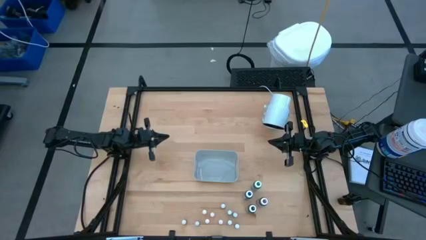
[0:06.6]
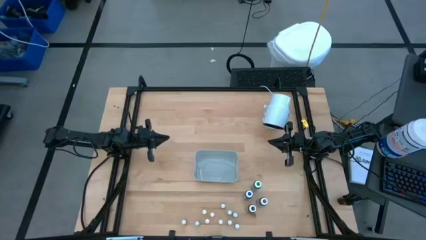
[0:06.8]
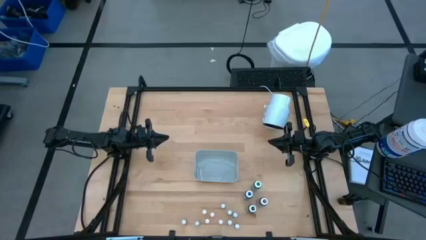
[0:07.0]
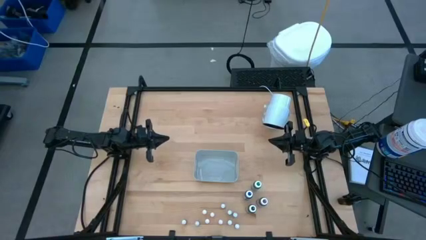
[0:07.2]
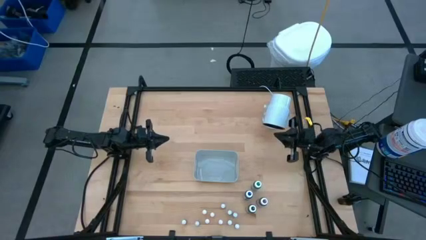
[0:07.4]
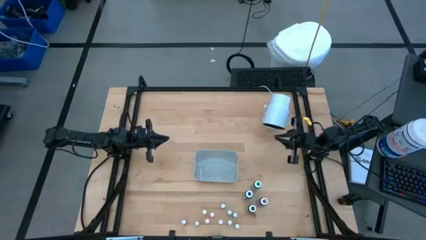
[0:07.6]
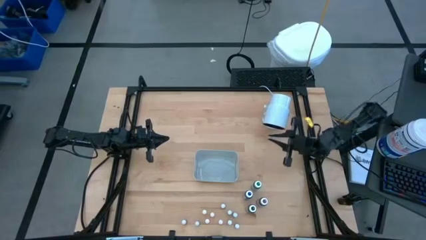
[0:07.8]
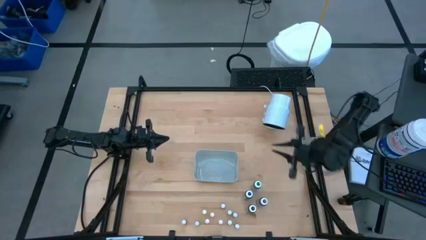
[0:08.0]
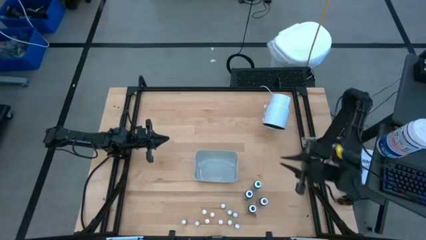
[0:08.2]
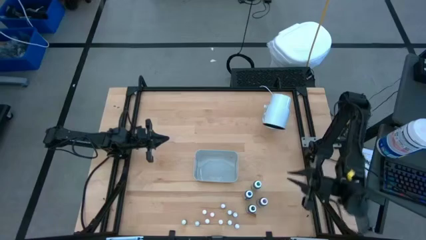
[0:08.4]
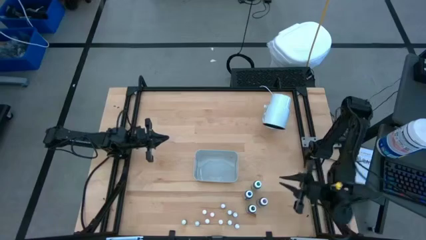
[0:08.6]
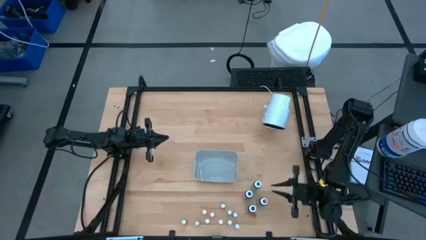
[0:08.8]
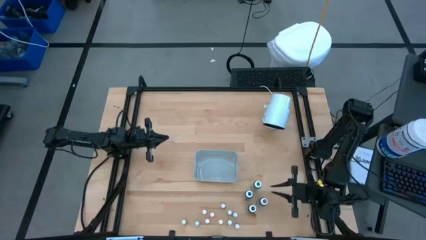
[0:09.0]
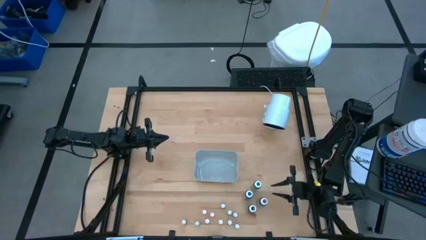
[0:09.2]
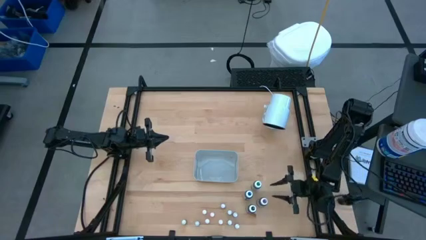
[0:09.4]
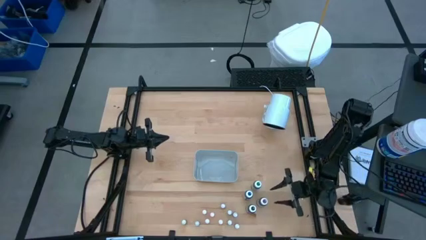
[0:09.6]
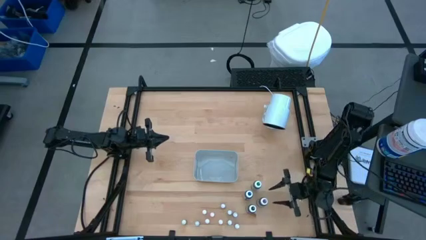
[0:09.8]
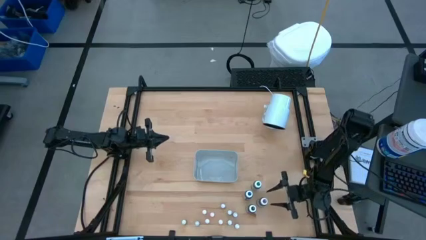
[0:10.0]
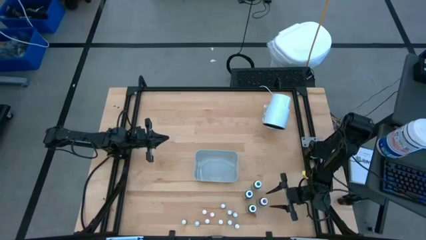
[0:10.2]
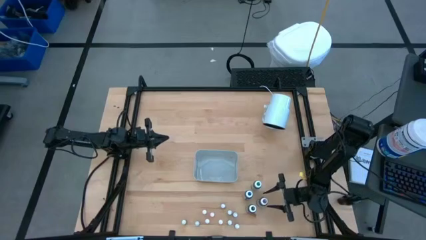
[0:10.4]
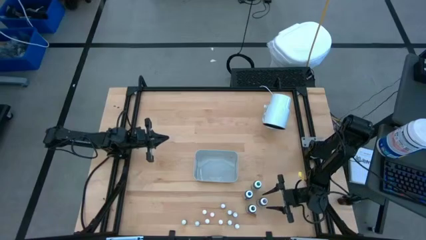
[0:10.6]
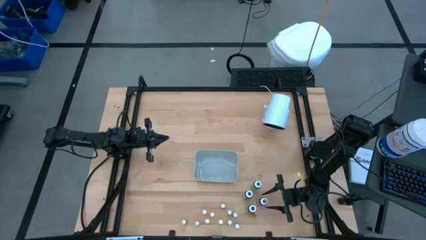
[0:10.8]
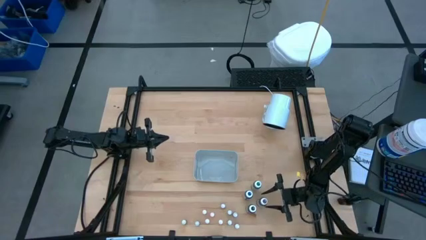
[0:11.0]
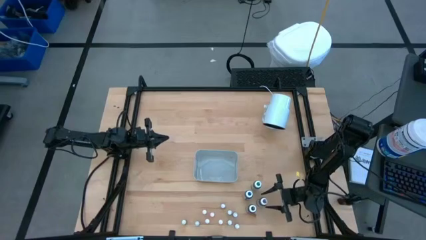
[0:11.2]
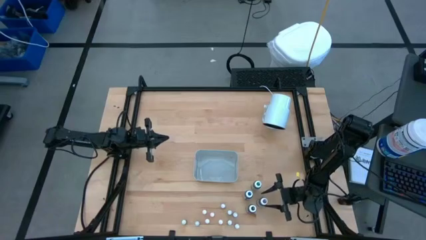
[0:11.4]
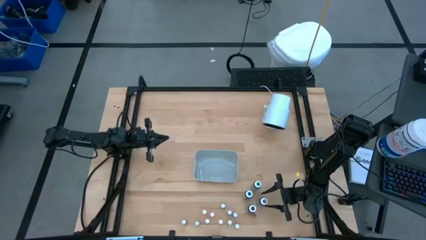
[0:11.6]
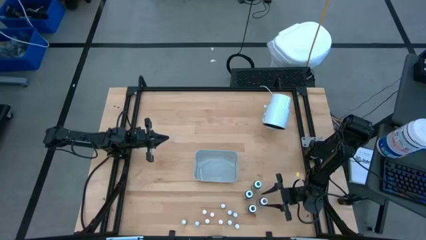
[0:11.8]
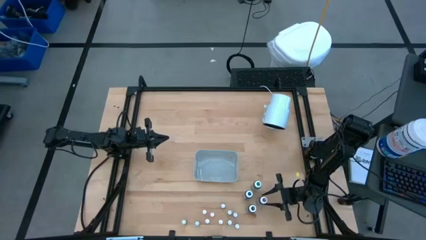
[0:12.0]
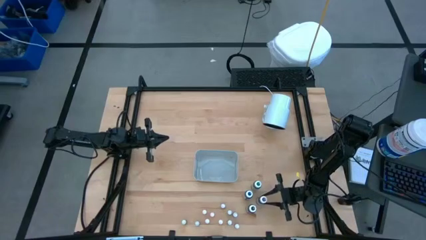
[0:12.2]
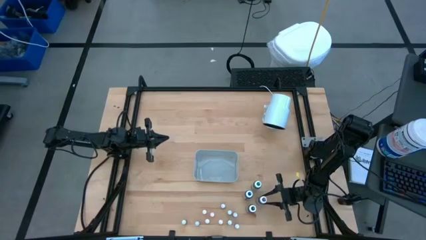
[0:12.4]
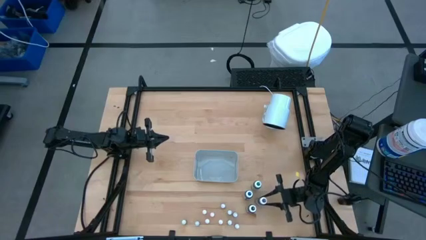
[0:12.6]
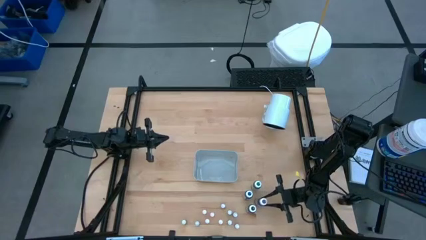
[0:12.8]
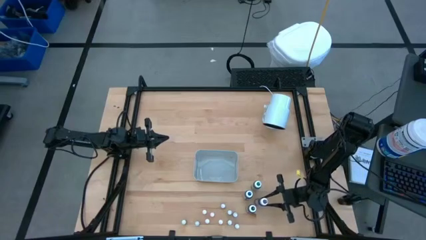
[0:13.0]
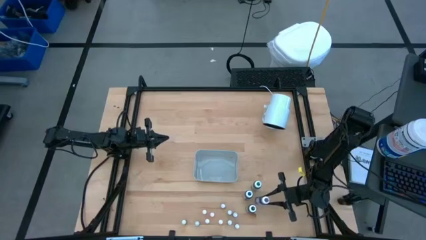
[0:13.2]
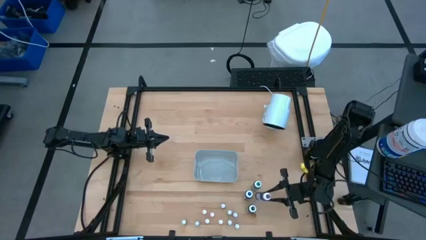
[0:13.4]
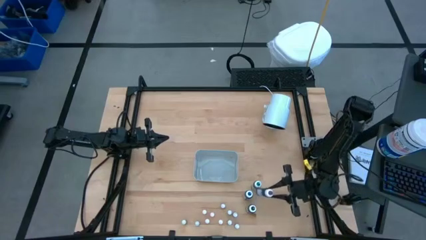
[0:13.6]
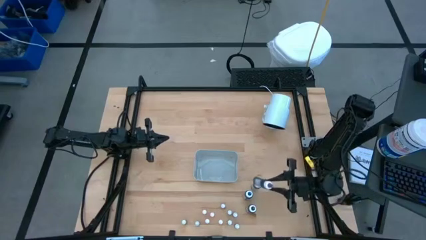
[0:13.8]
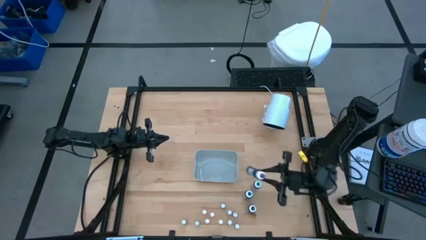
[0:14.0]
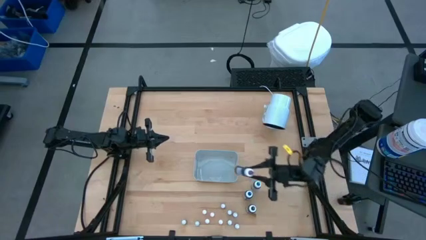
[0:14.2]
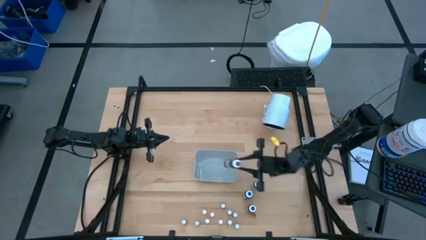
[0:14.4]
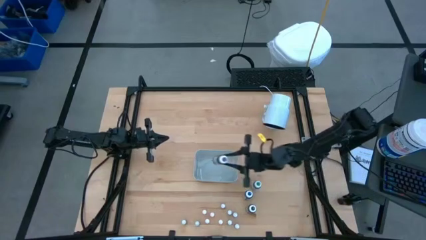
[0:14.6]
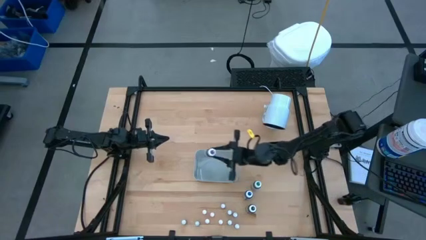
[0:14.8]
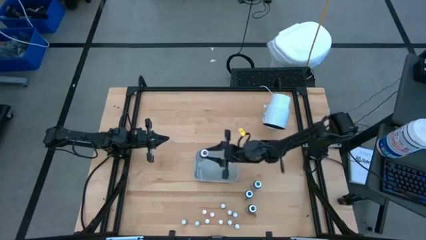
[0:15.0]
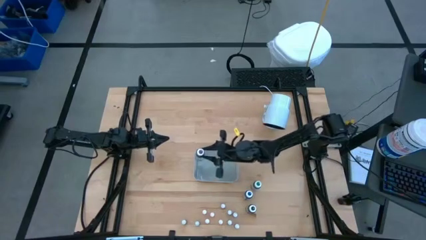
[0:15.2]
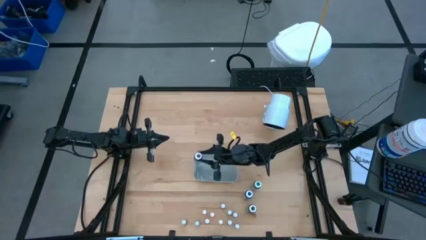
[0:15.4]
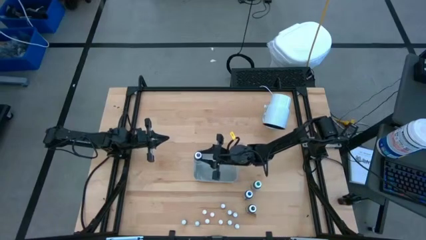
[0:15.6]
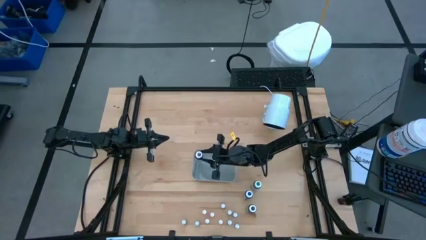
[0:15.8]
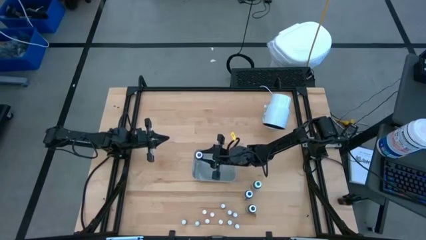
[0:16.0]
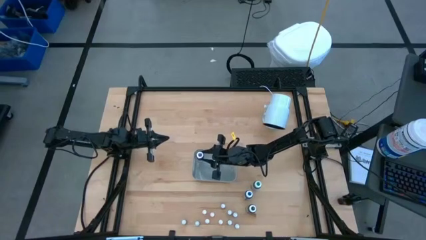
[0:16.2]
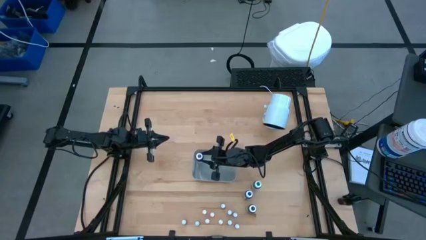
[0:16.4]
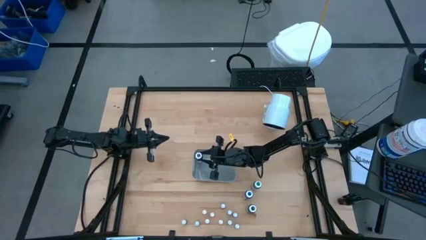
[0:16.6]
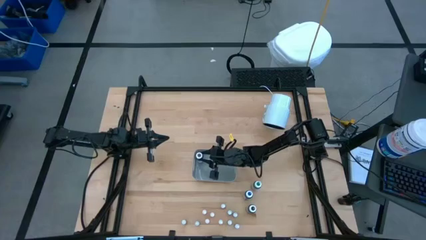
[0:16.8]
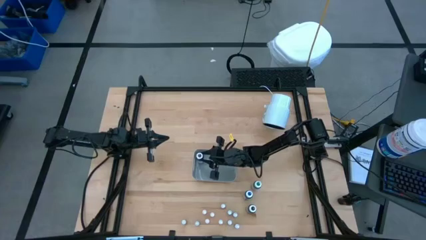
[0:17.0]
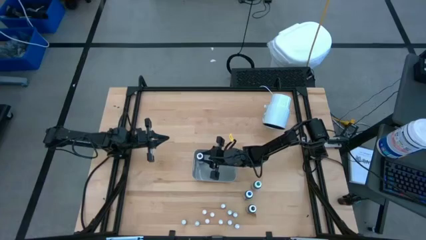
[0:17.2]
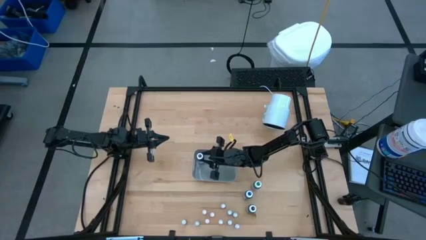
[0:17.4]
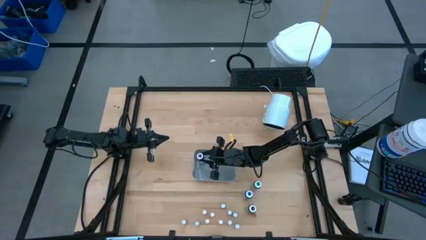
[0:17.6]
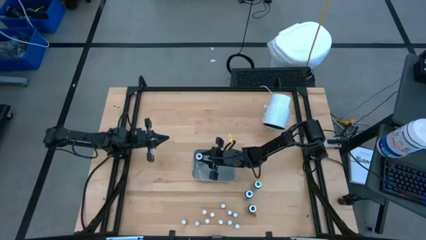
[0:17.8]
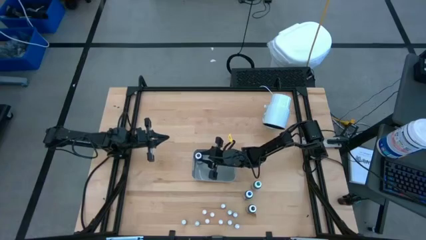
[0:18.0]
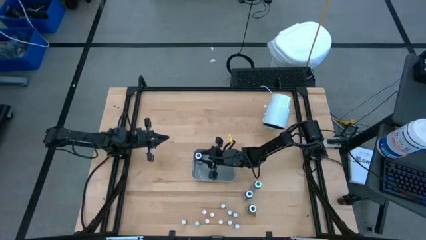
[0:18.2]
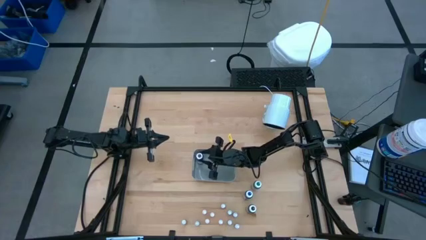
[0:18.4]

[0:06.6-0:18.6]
Task: Pick & Place food coloring
Put the big purple food coloring bottle into the gray bin
